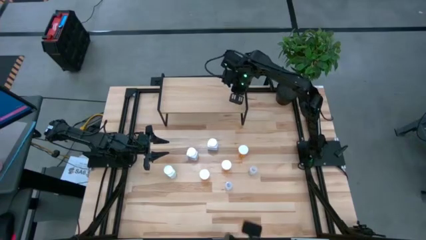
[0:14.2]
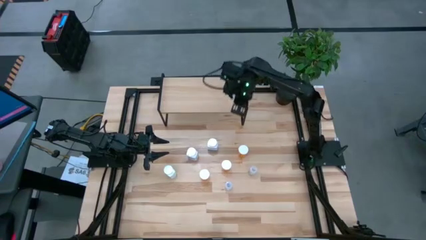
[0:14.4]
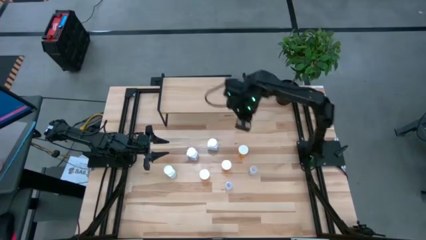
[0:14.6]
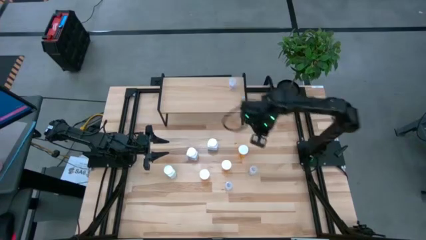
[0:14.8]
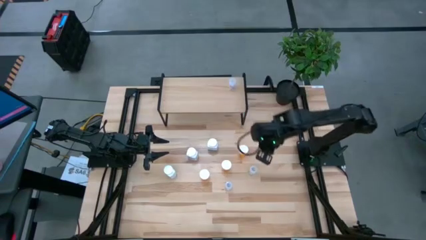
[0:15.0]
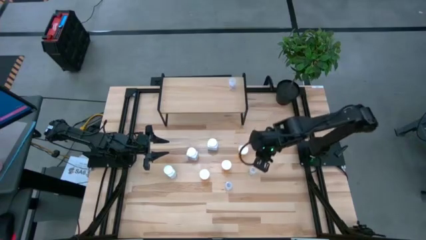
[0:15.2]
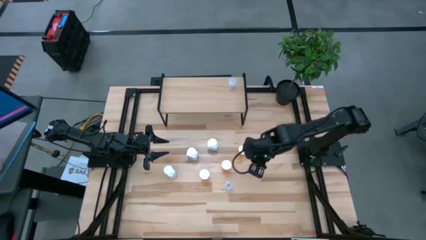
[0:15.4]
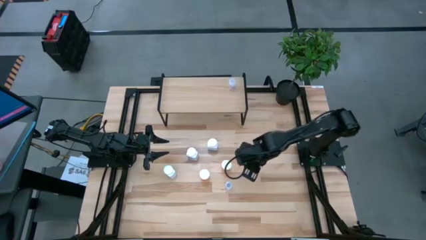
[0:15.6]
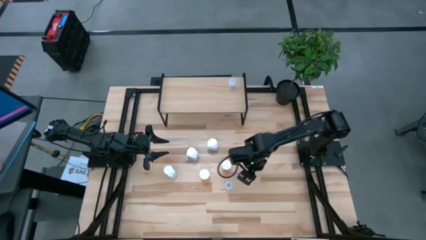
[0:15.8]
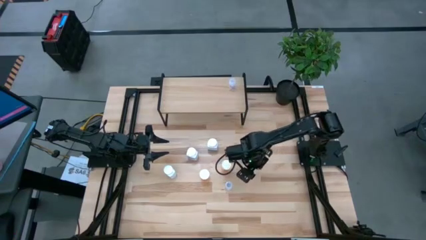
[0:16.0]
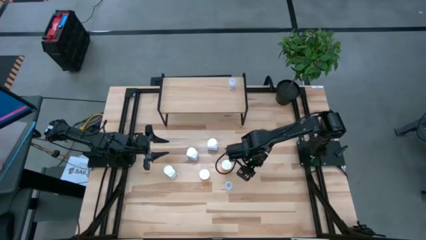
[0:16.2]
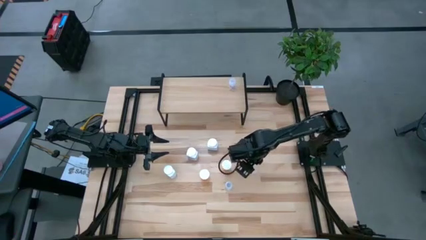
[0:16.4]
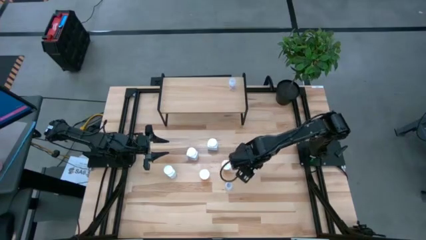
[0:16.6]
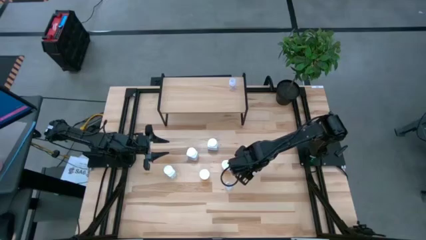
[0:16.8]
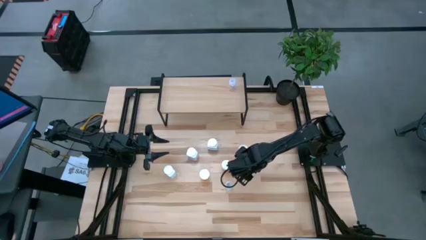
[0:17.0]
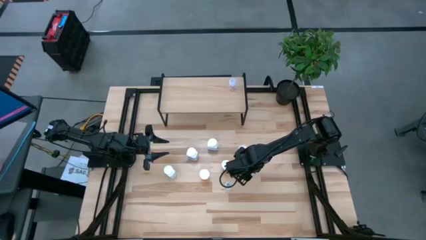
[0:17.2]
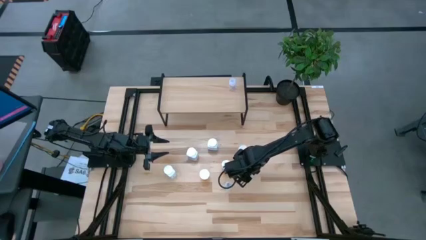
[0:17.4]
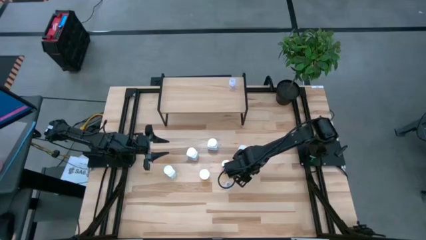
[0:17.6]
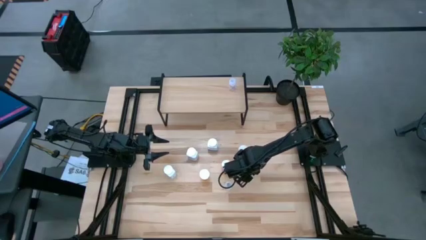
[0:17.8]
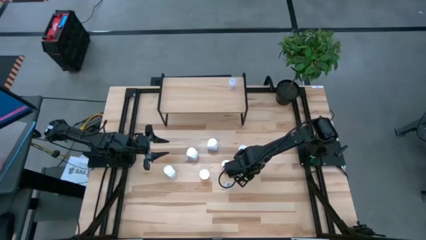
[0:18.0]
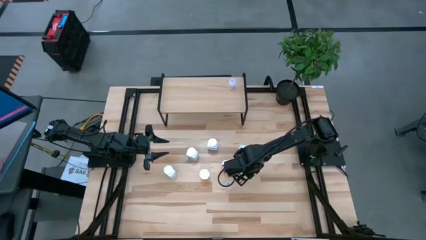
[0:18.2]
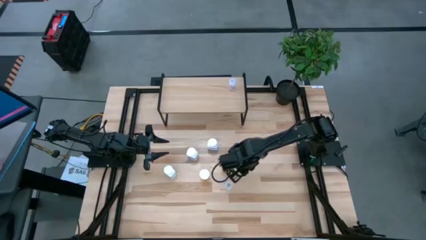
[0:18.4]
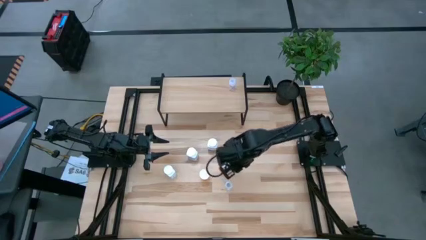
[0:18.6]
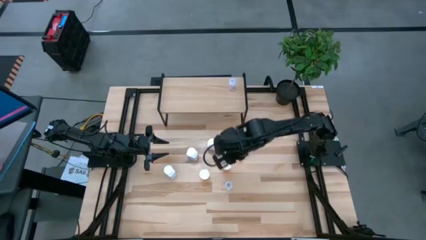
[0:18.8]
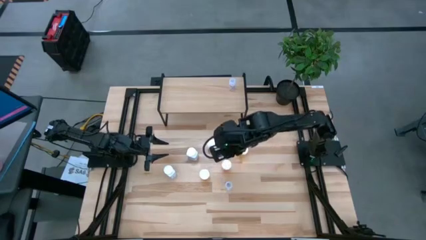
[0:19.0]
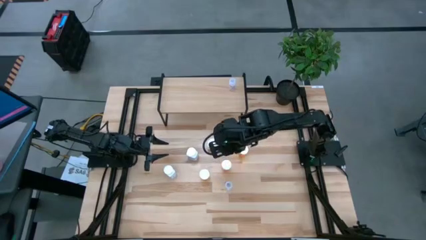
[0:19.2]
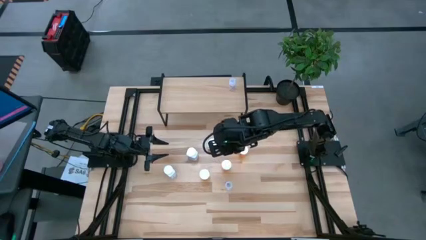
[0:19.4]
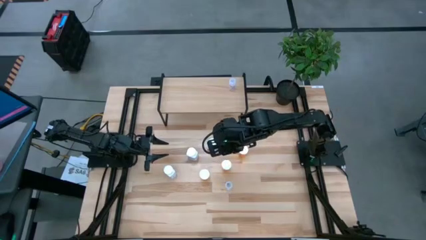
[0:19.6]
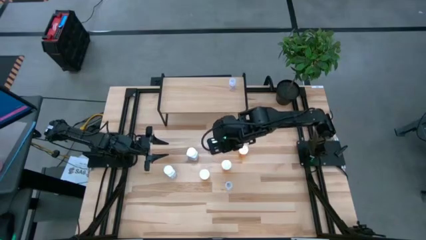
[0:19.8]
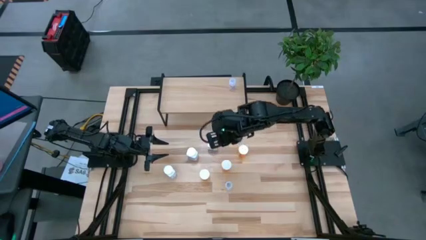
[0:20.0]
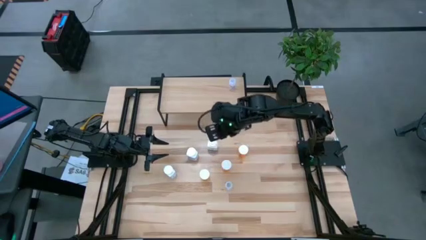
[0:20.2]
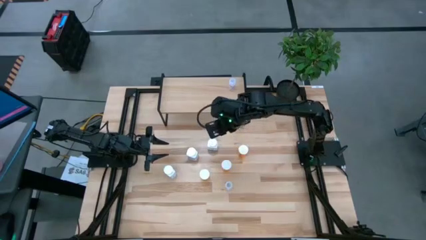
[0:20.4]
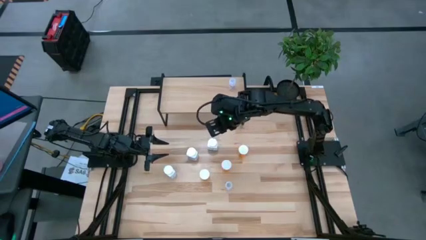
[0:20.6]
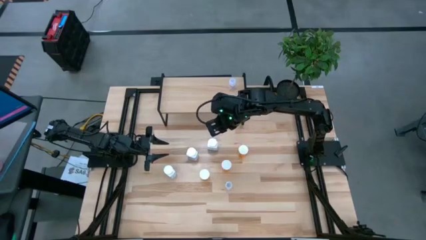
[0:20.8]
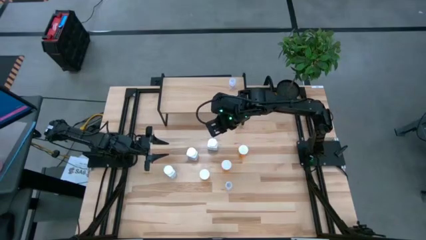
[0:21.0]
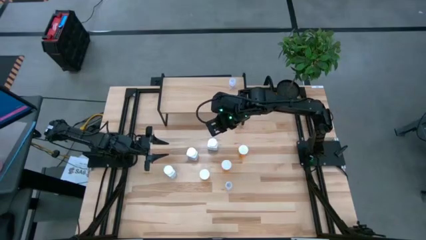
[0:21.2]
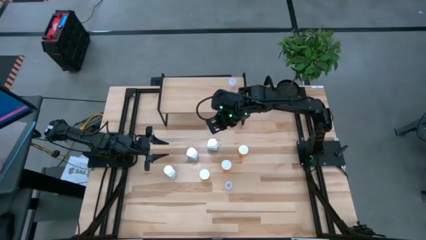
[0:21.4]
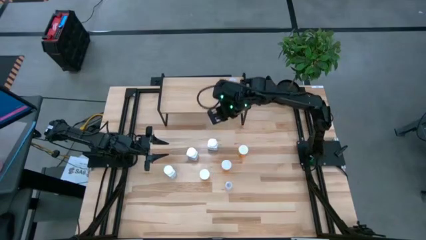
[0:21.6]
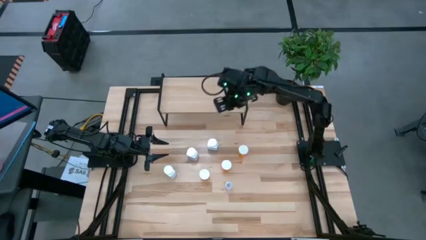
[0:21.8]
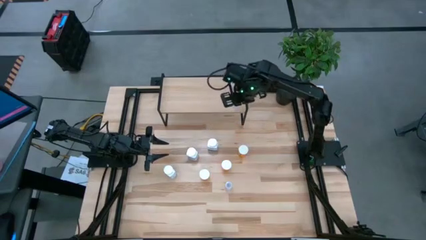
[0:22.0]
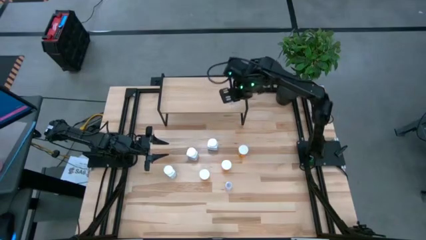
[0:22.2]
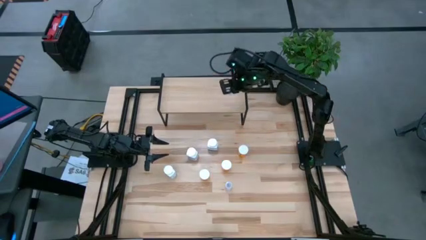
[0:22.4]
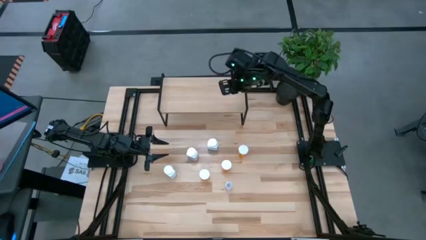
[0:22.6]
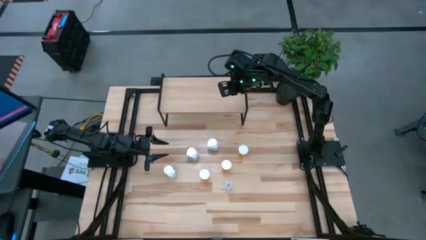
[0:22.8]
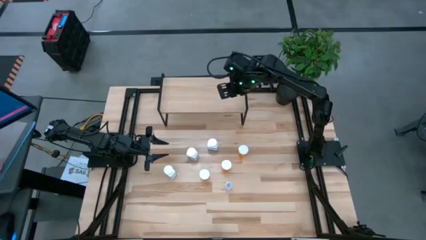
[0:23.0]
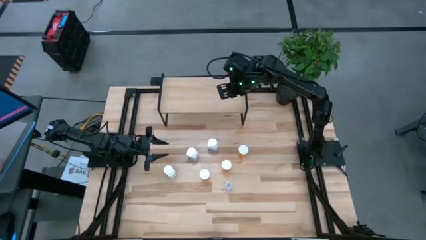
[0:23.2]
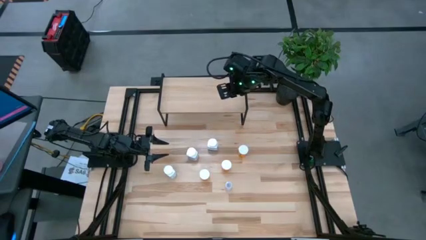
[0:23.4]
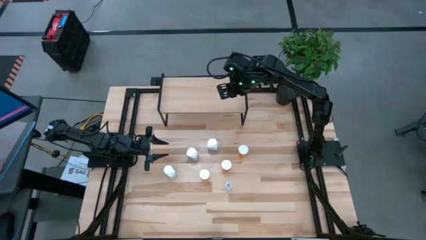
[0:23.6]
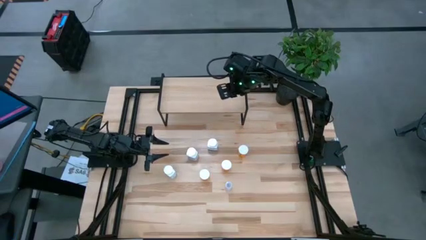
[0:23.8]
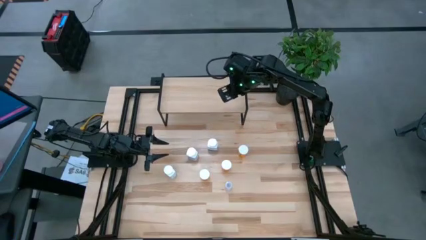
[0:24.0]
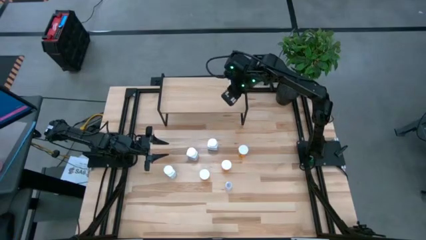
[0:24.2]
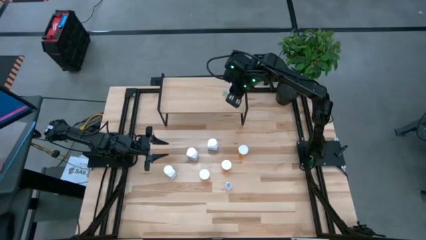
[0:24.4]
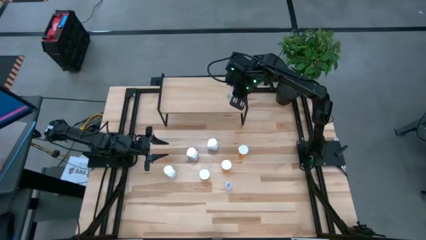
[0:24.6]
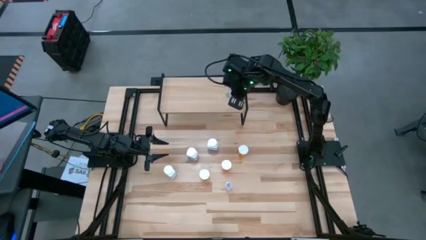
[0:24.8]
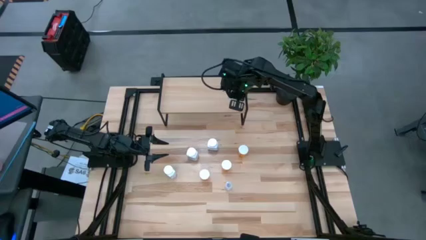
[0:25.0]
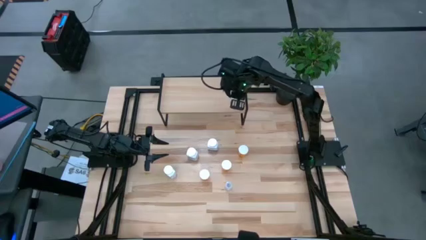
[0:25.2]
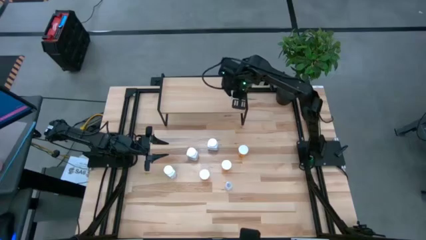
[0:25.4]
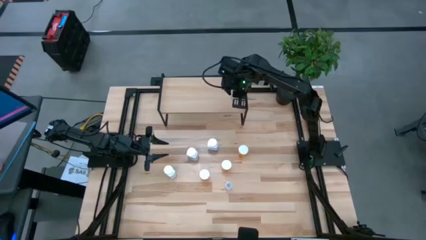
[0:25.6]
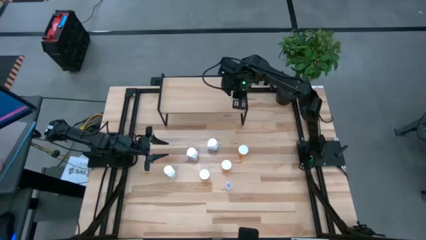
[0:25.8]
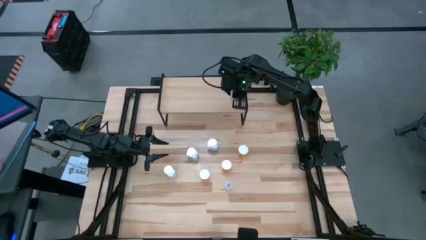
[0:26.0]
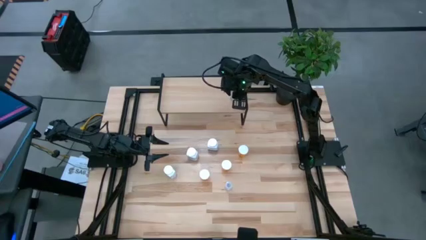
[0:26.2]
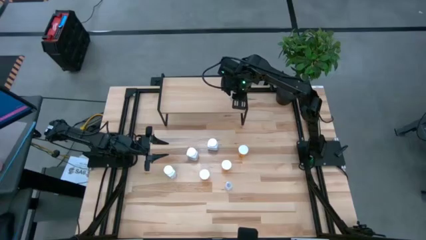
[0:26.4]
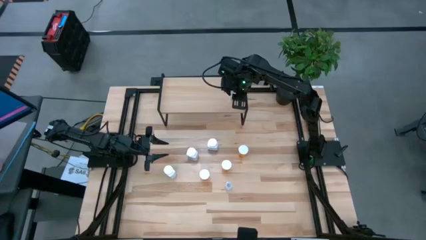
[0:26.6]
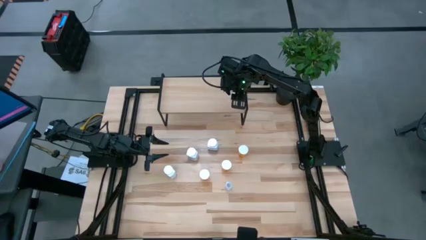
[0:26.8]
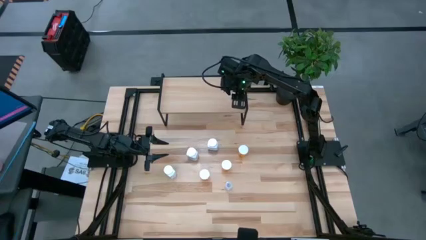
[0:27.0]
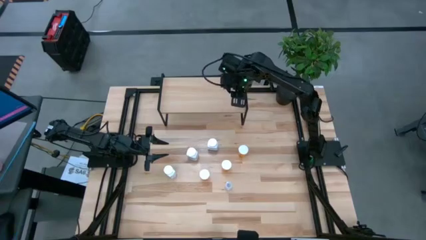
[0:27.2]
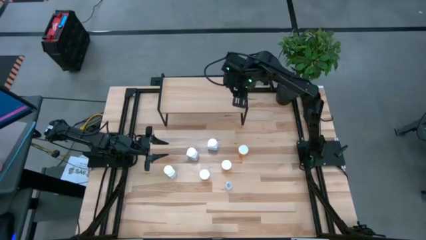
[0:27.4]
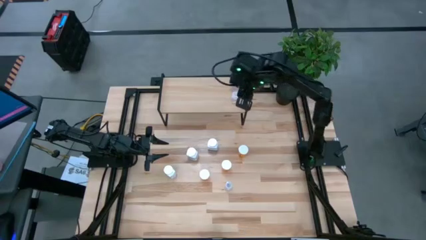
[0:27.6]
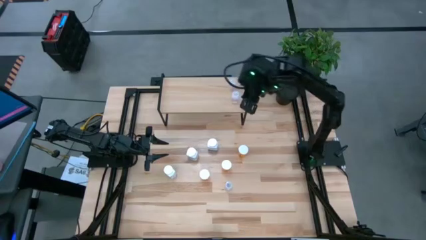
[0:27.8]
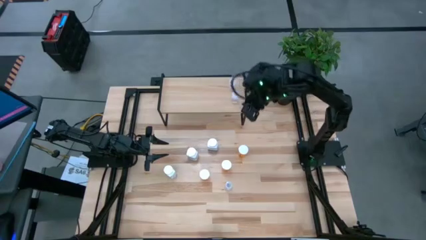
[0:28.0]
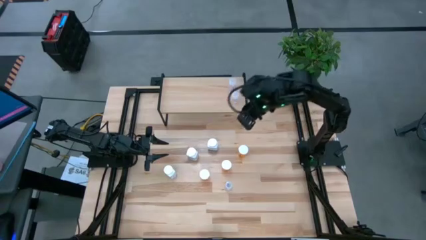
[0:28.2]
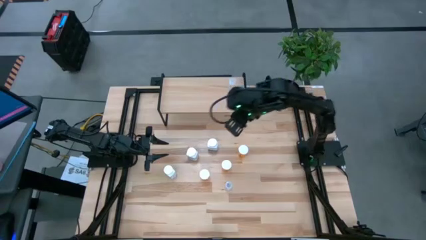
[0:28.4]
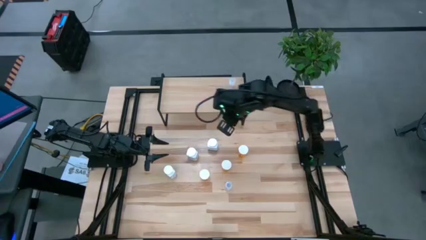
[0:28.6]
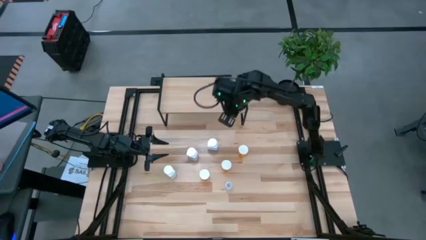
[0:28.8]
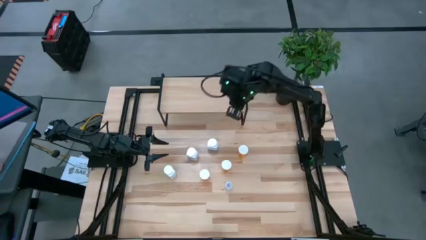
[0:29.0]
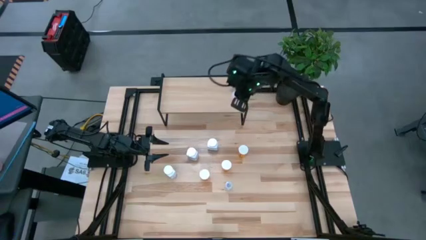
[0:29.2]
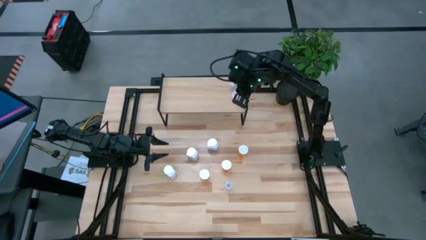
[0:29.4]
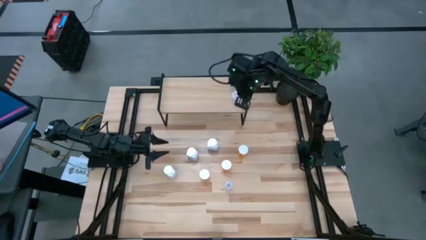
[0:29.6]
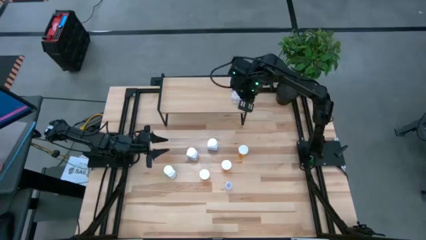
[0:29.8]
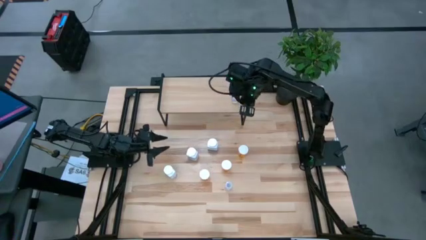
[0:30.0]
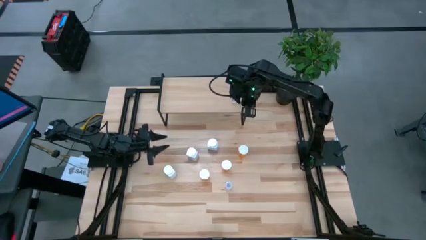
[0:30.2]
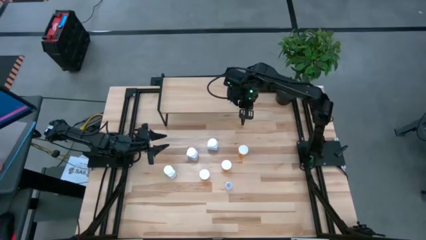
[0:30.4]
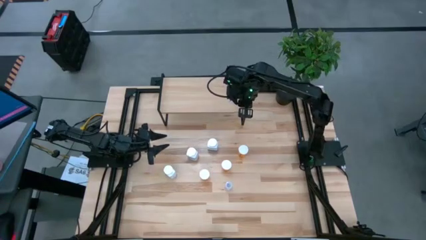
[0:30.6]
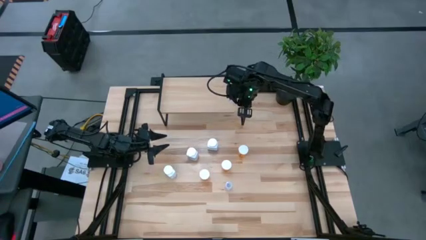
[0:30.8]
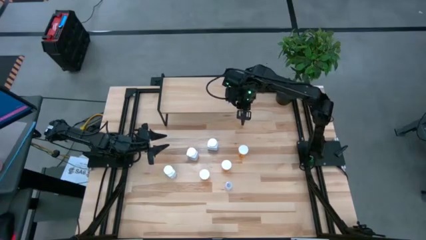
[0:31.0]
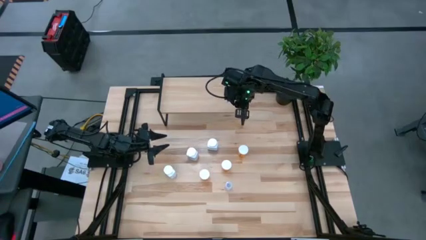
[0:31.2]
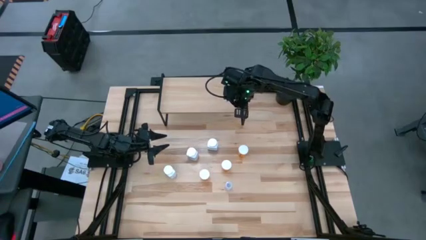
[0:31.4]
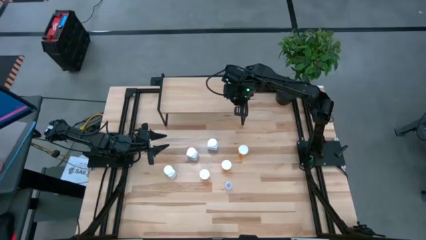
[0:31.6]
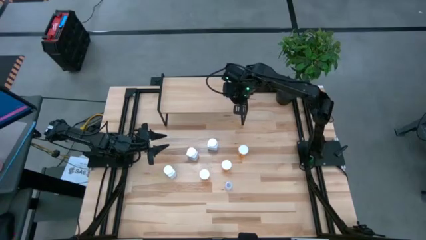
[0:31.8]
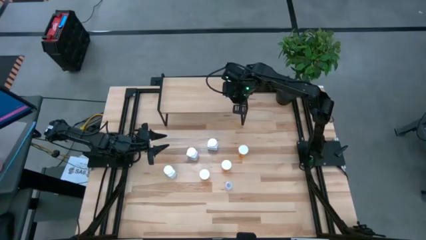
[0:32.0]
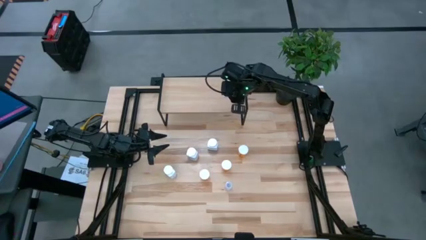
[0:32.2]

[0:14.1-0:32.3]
Task: Pick and place medicine bottles onto shelf by color
Put the top transparent pill bottle aligned with the other transparent pill bottle on the shelf
